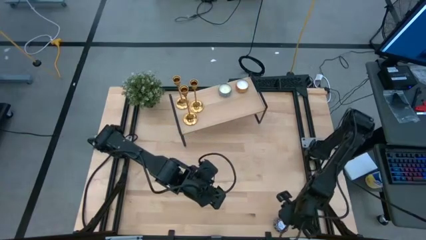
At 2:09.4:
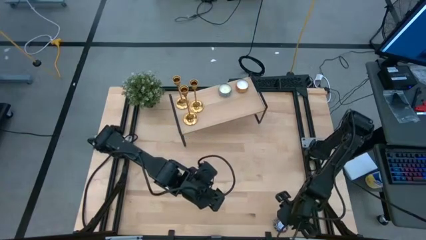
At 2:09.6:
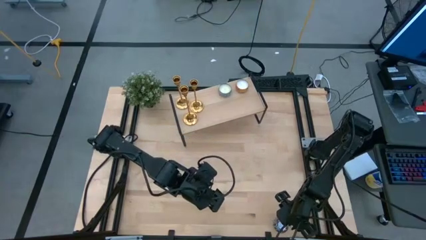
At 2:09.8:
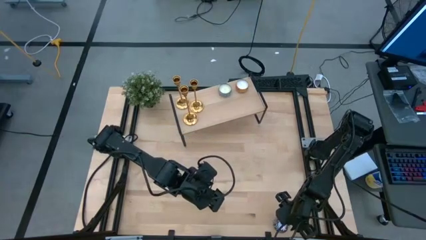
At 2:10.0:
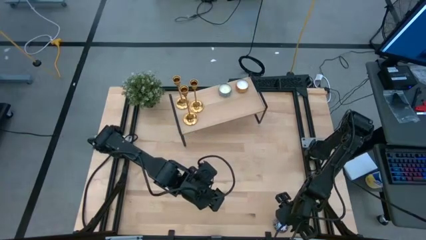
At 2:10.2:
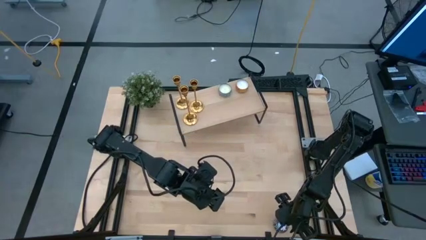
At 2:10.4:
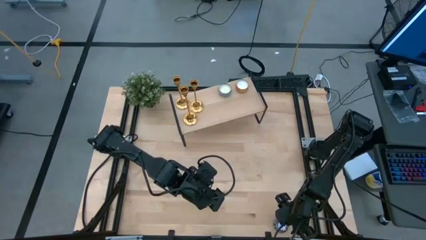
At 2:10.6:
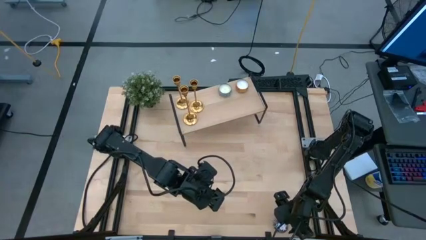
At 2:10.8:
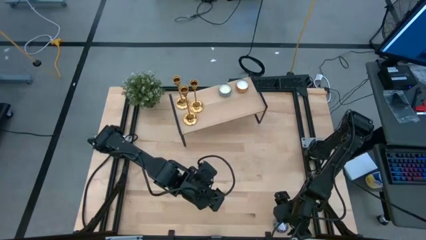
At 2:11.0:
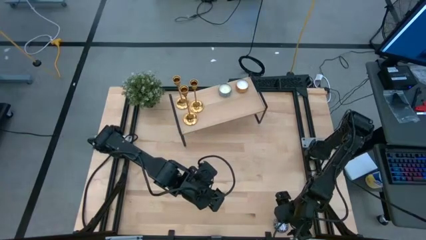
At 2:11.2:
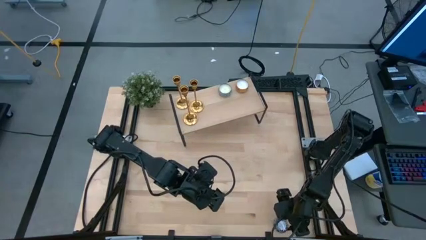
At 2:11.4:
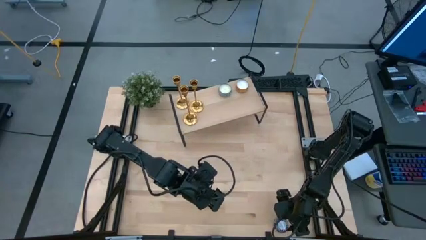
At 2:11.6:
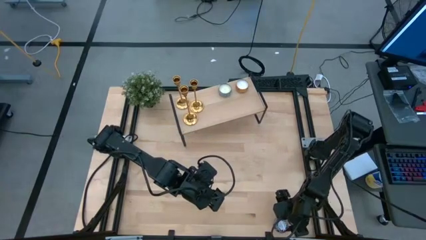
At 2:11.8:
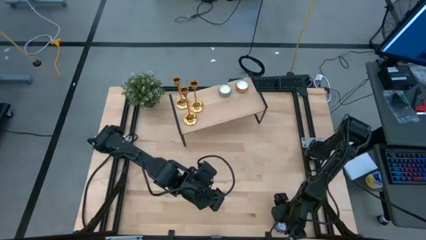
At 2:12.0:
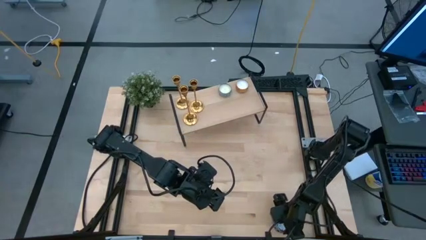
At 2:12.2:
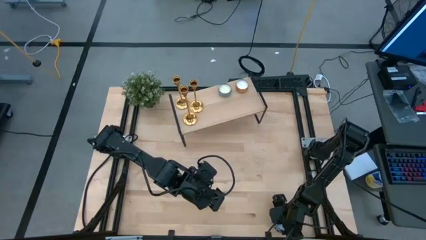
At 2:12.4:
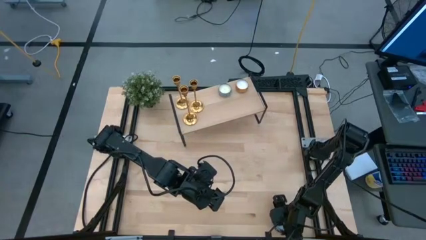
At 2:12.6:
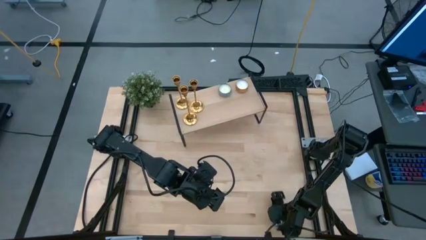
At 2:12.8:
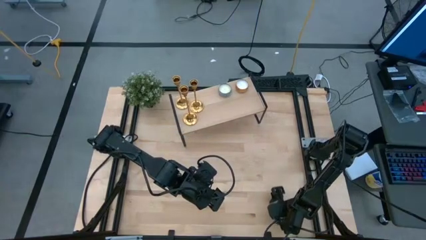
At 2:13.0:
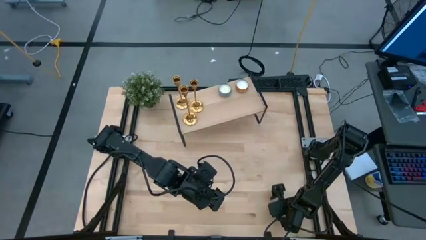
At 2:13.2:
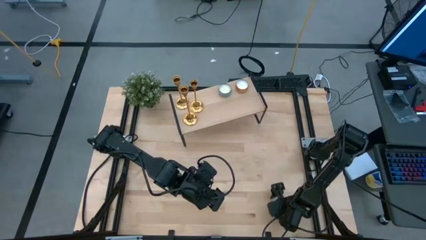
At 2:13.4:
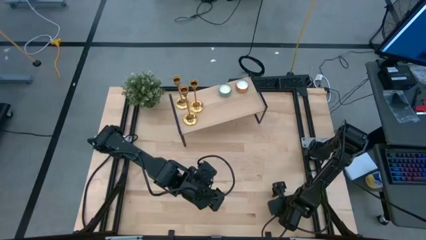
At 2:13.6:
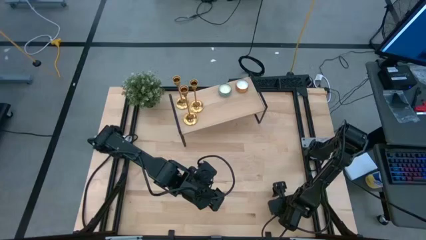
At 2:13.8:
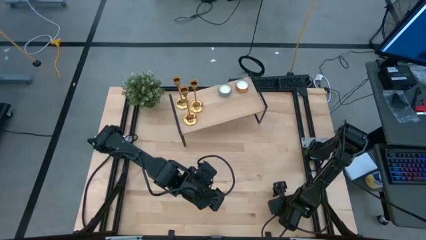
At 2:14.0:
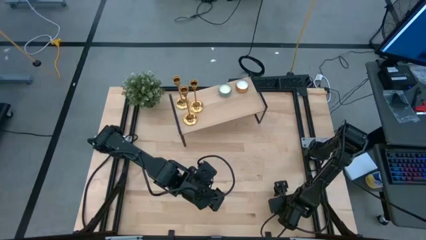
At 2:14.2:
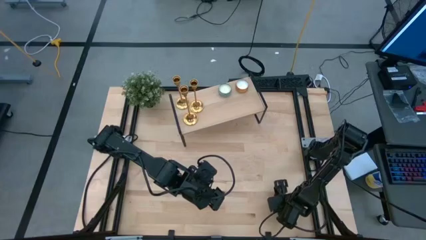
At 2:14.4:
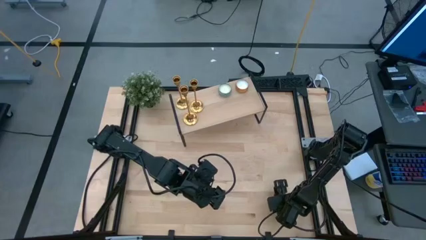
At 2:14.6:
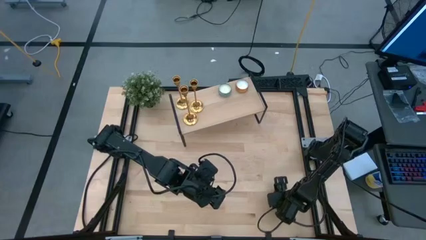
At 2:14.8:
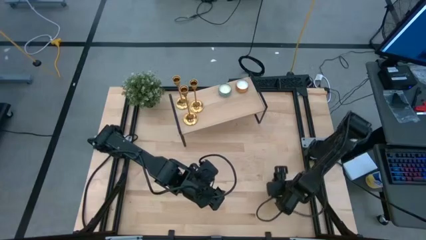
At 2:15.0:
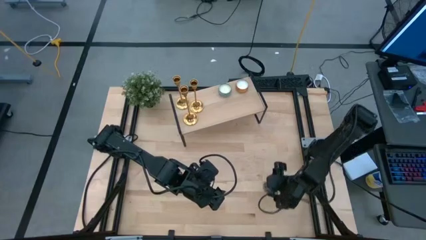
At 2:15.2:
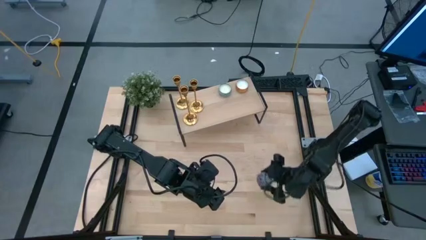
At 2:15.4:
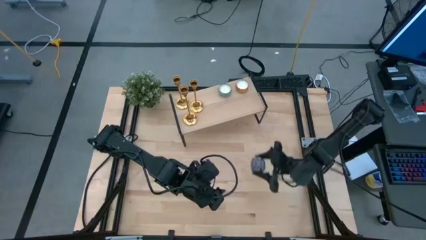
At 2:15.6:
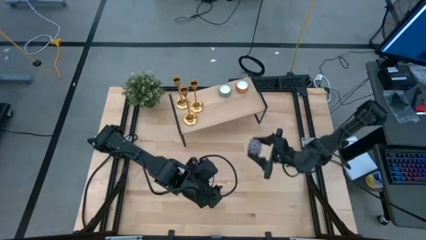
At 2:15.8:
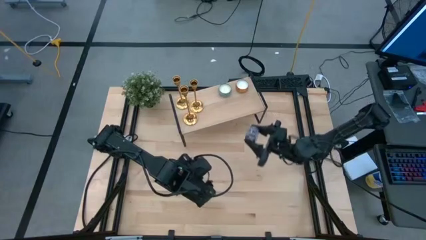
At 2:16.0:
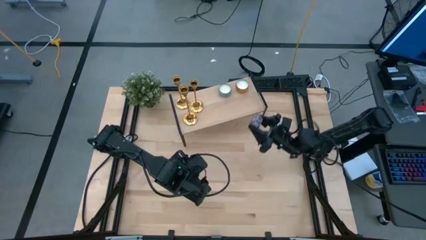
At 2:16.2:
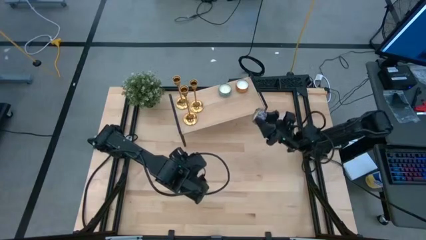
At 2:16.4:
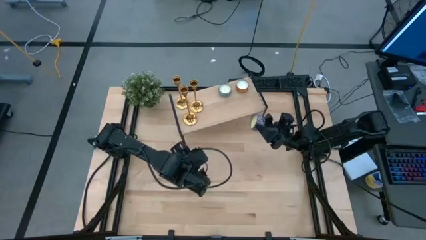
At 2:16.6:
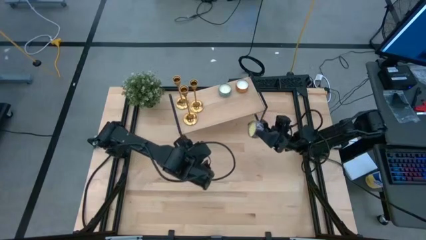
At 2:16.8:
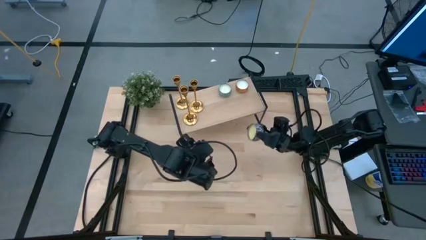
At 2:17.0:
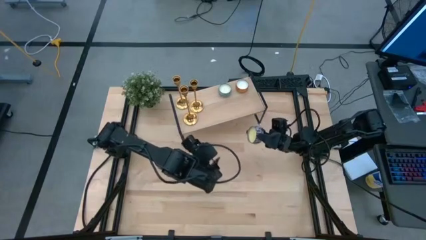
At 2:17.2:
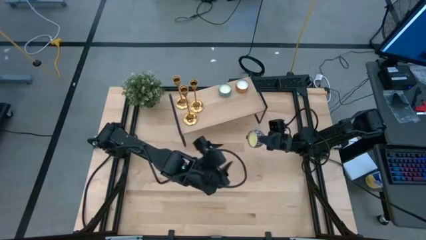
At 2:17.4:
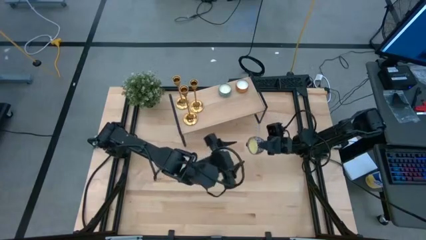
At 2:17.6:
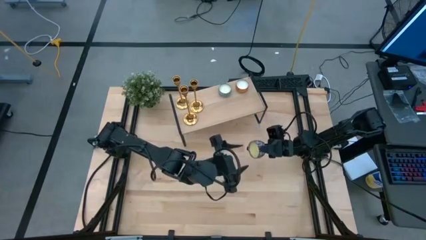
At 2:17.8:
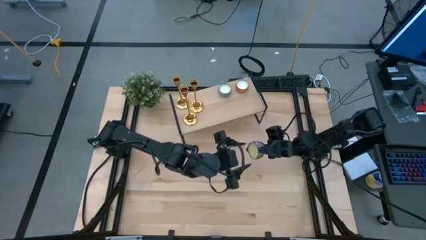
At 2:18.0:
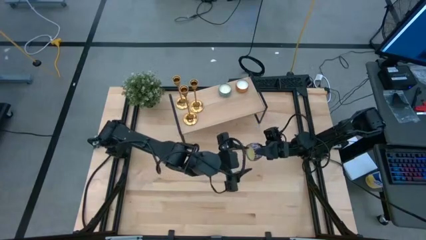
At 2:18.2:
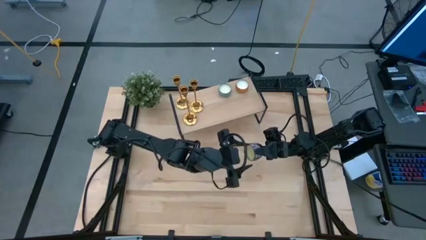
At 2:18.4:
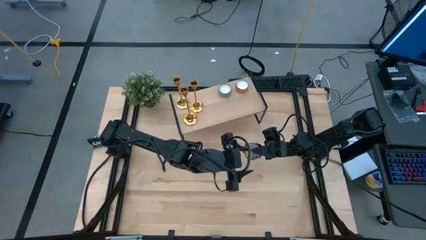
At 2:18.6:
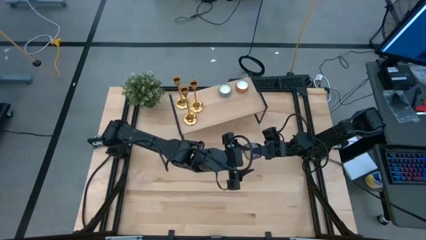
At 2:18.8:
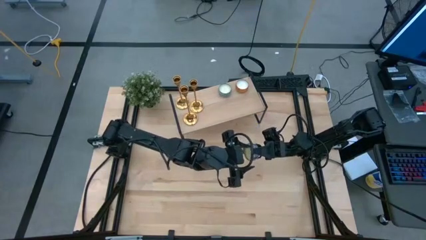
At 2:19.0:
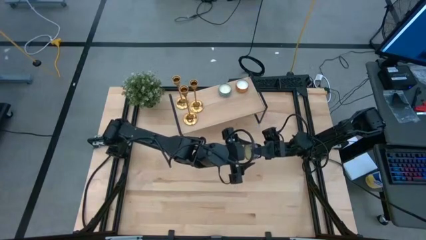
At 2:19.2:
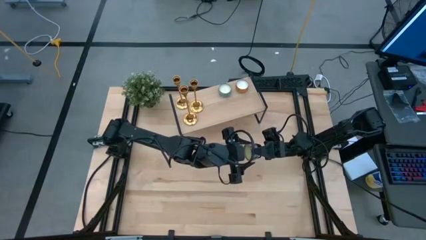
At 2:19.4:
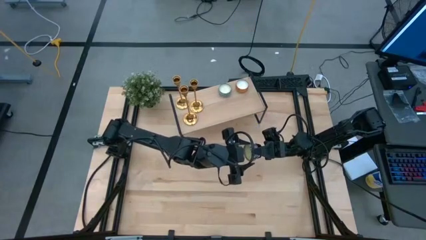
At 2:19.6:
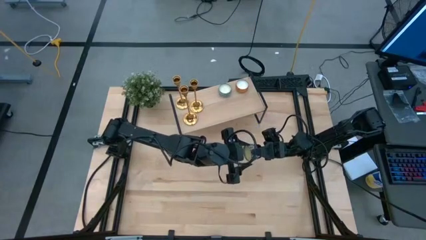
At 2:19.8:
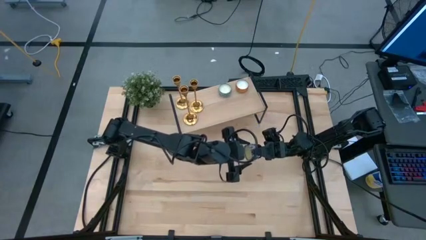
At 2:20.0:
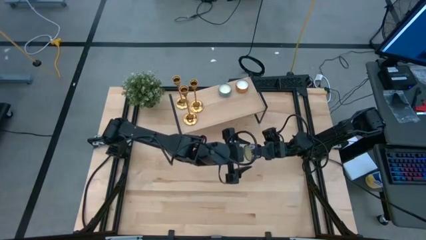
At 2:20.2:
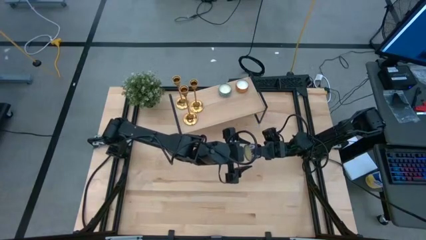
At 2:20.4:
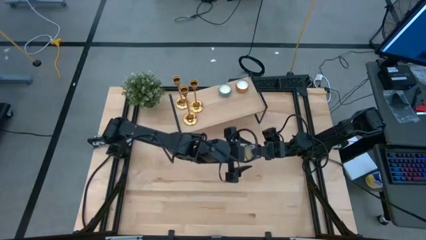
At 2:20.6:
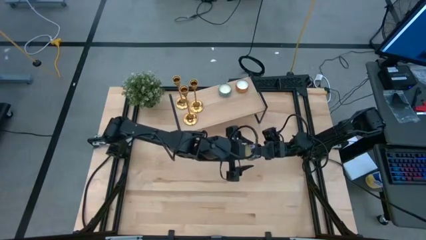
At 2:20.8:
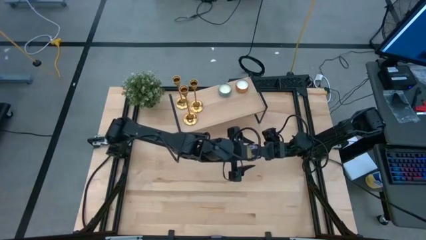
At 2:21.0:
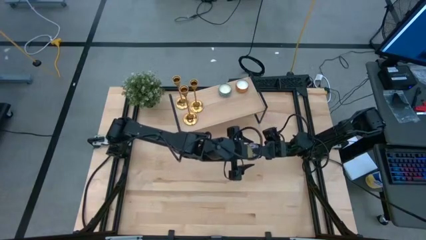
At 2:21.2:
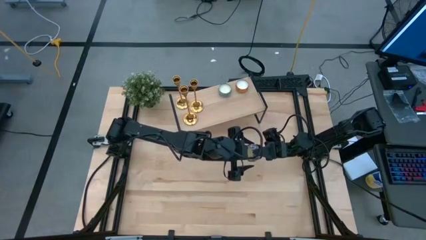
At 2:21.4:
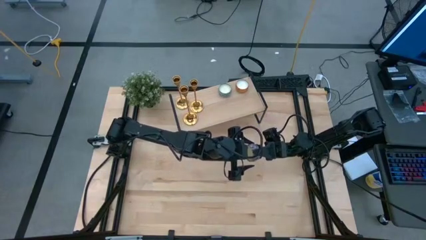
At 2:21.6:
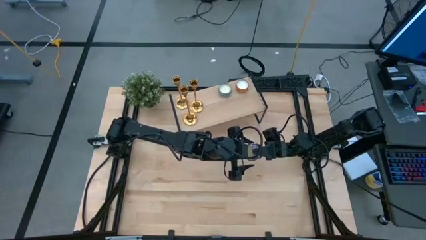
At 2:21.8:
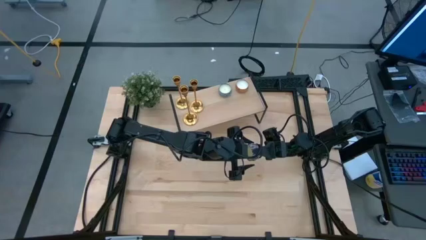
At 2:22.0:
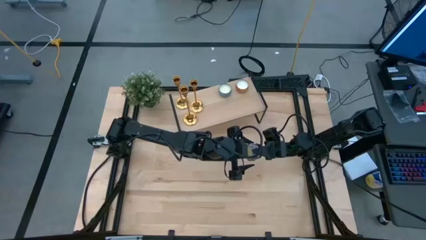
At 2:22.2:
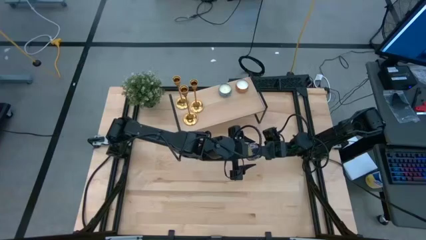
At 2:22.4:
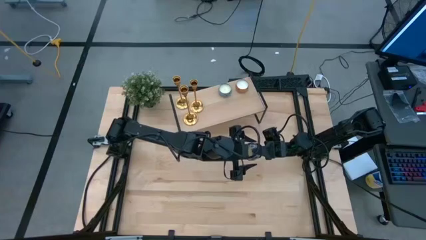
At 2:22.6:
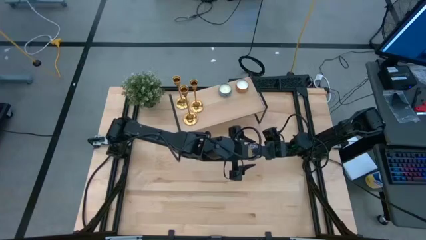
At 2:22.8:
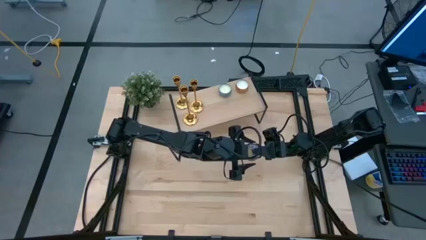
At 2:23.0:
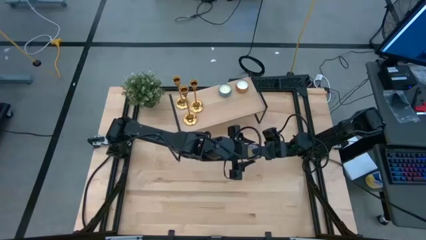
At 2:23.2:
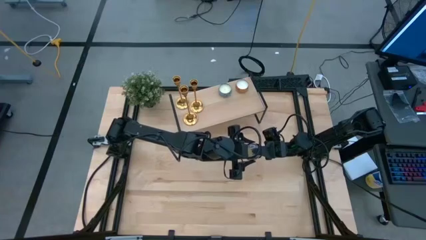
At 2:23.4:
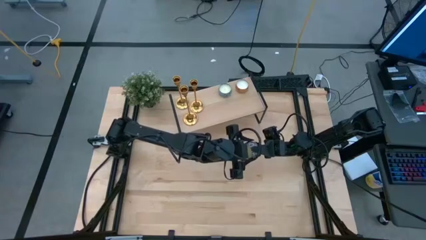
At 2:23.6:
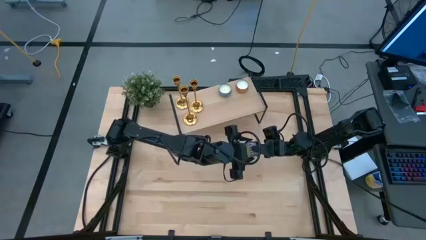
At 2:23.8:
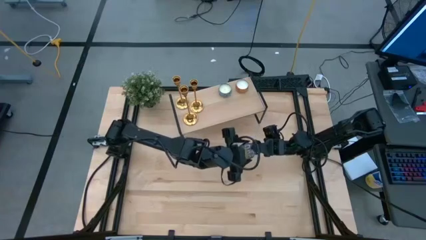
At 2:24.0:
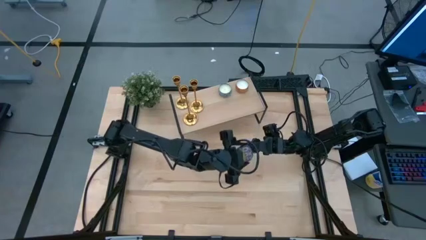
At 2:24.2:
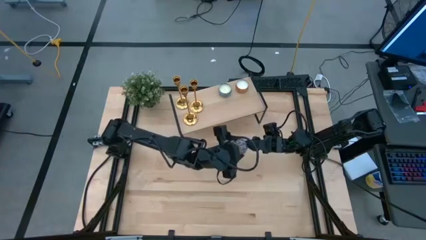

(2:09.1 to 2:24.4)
Task: Pick & Place candle stick holders
Put the black scented candle on the shelf
